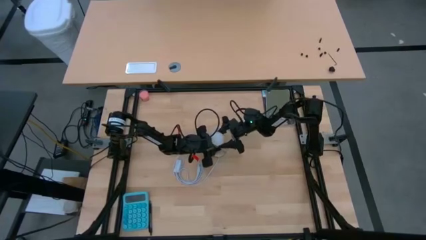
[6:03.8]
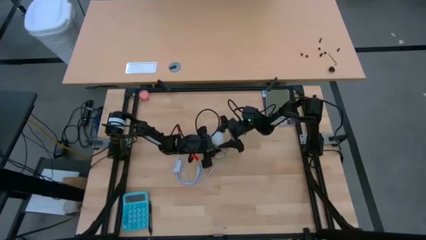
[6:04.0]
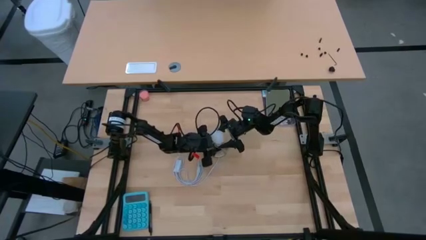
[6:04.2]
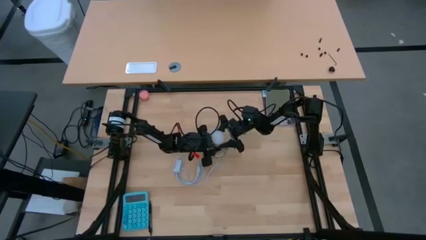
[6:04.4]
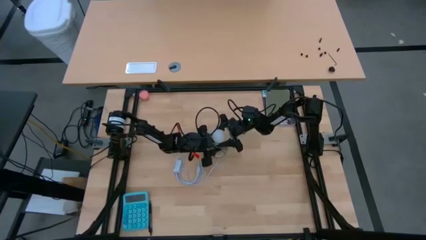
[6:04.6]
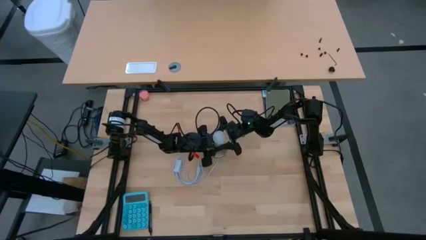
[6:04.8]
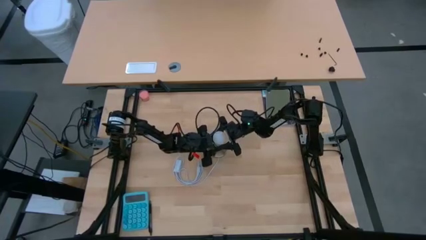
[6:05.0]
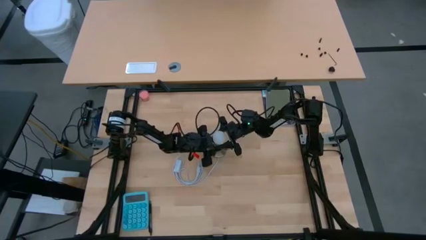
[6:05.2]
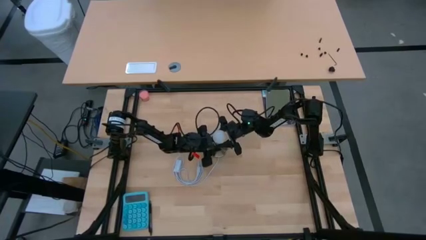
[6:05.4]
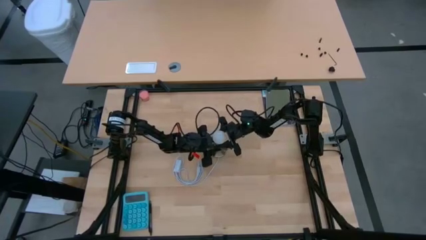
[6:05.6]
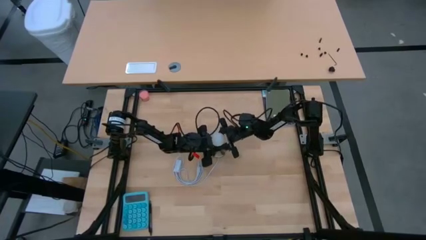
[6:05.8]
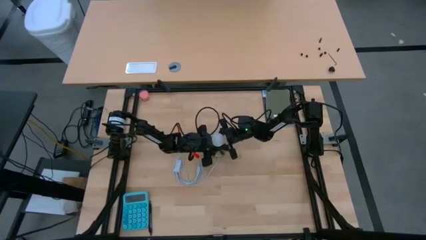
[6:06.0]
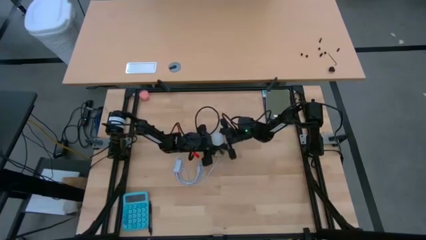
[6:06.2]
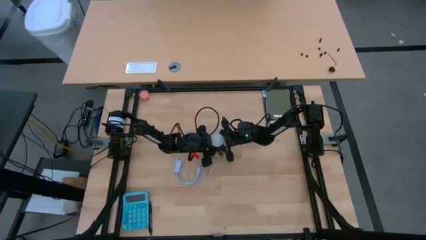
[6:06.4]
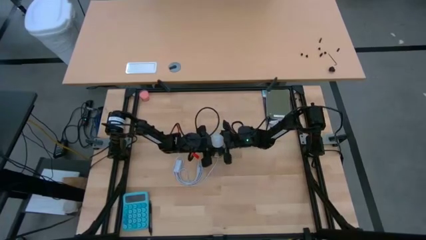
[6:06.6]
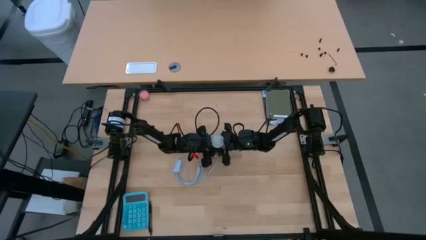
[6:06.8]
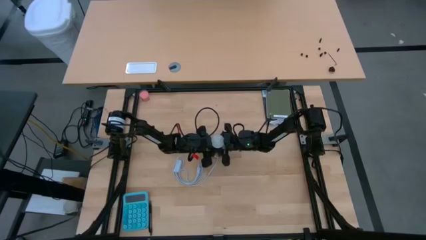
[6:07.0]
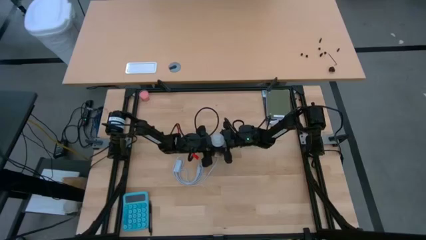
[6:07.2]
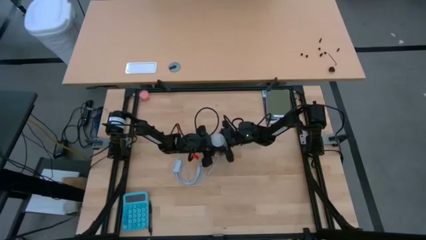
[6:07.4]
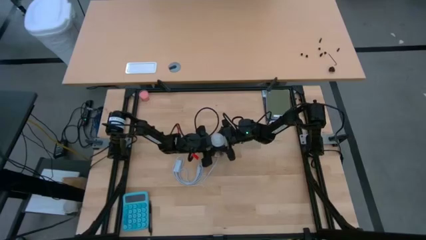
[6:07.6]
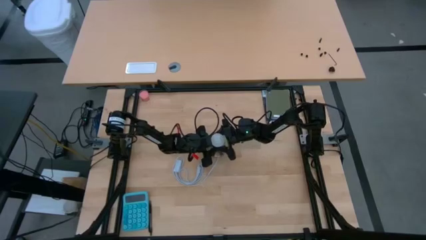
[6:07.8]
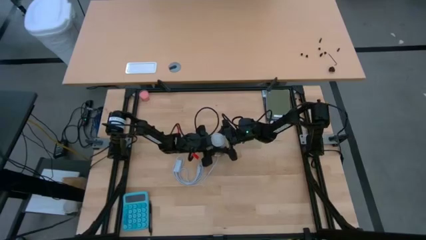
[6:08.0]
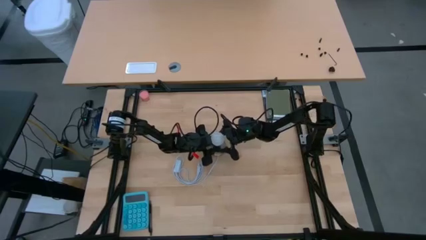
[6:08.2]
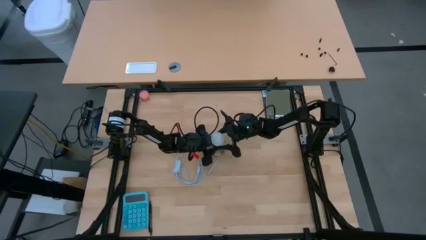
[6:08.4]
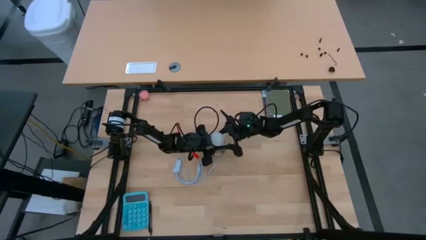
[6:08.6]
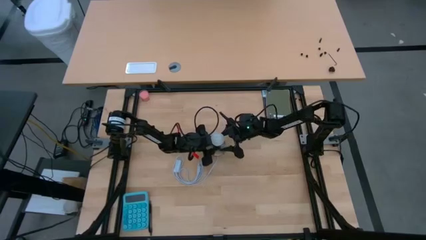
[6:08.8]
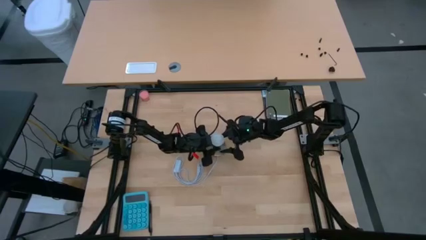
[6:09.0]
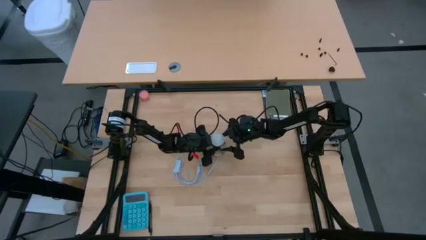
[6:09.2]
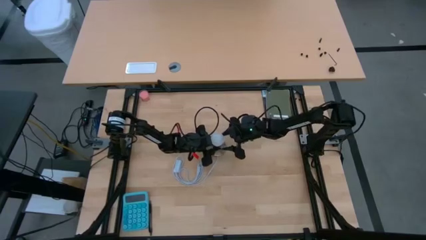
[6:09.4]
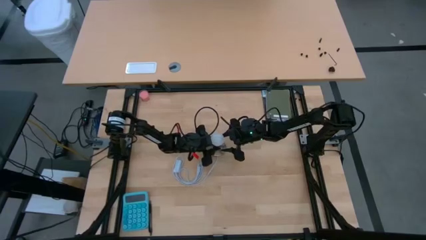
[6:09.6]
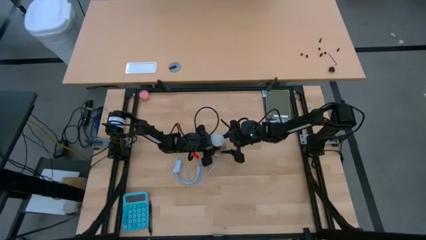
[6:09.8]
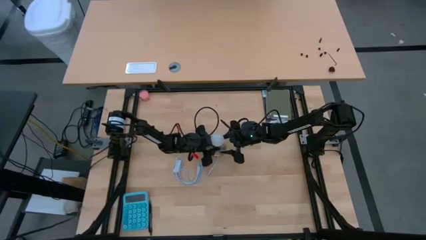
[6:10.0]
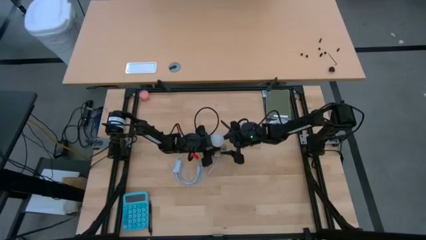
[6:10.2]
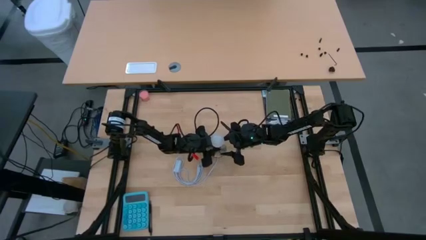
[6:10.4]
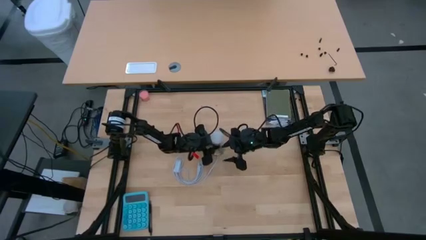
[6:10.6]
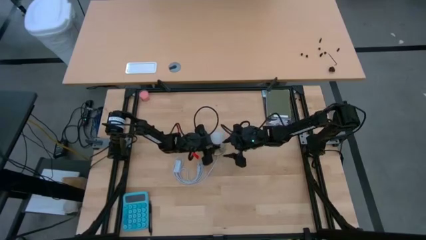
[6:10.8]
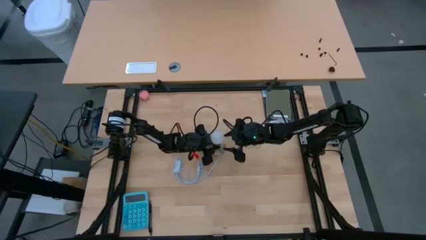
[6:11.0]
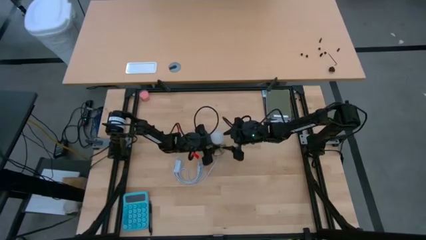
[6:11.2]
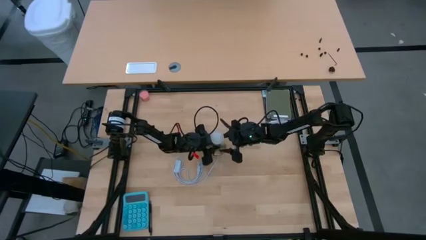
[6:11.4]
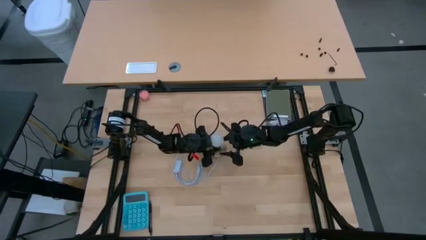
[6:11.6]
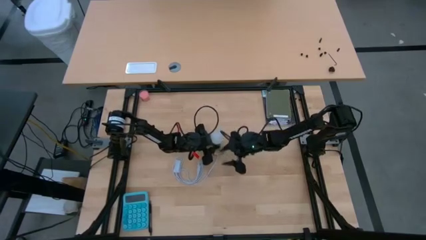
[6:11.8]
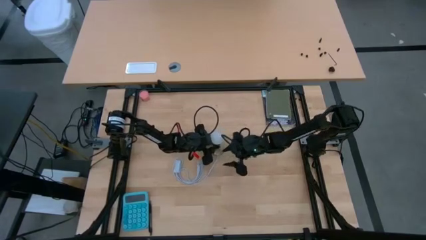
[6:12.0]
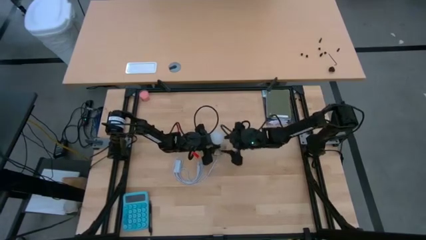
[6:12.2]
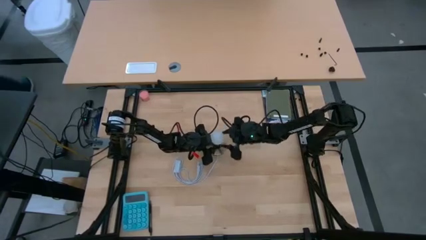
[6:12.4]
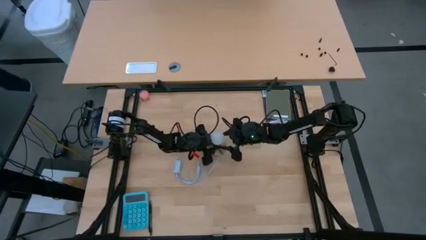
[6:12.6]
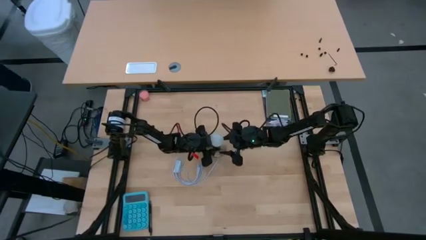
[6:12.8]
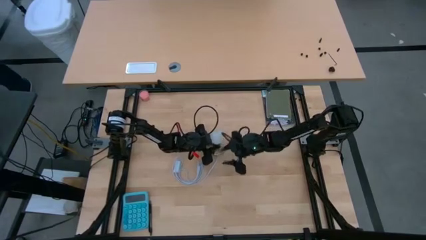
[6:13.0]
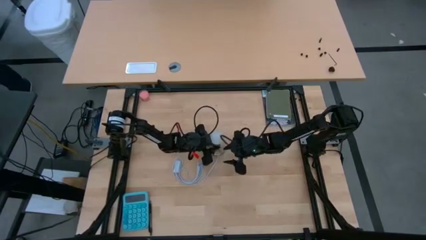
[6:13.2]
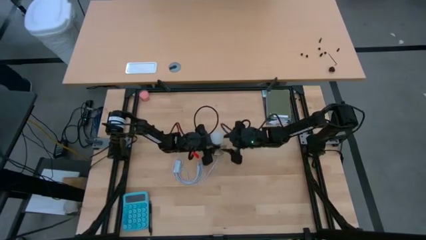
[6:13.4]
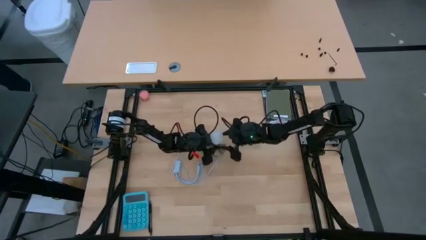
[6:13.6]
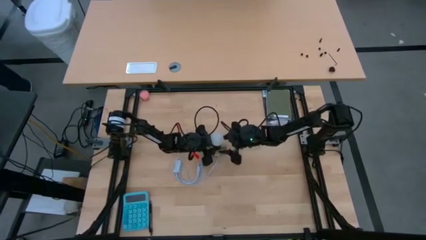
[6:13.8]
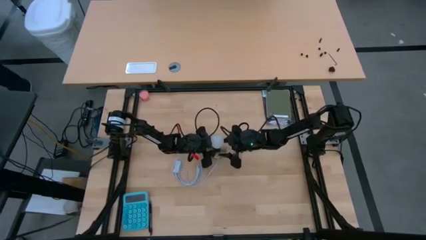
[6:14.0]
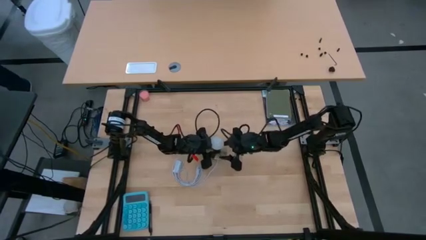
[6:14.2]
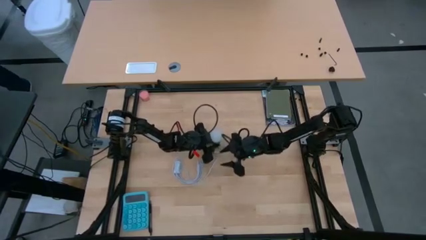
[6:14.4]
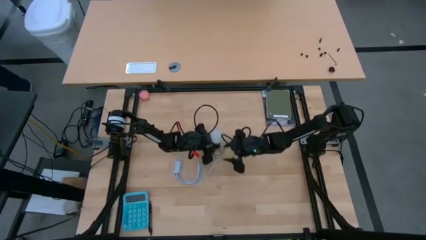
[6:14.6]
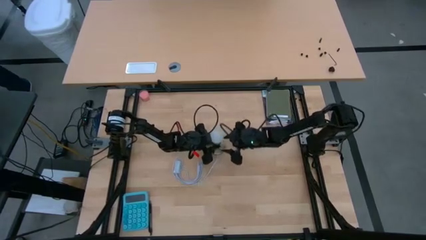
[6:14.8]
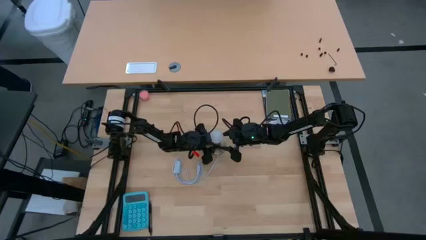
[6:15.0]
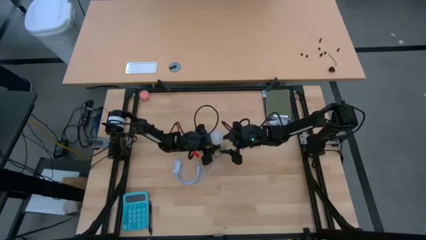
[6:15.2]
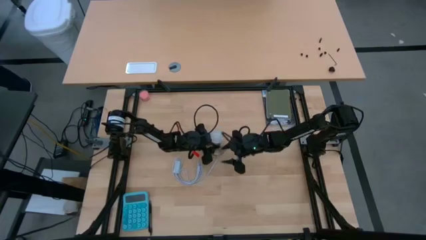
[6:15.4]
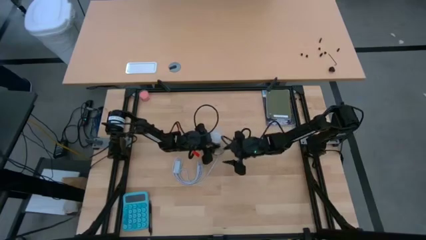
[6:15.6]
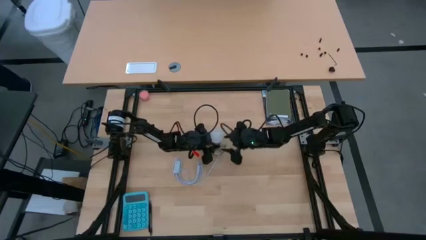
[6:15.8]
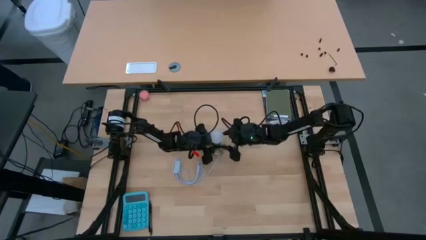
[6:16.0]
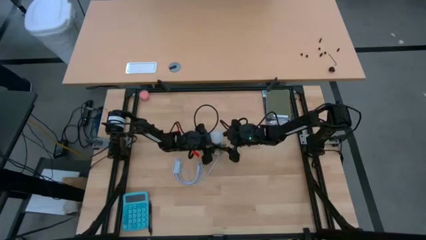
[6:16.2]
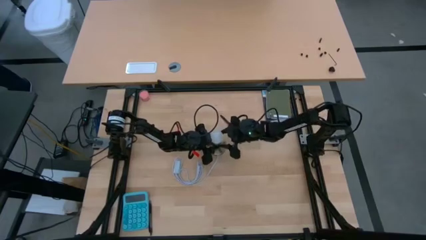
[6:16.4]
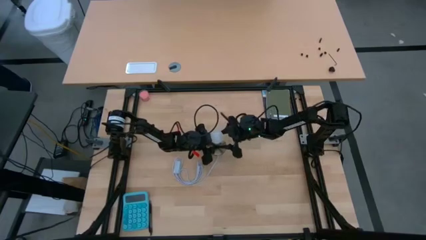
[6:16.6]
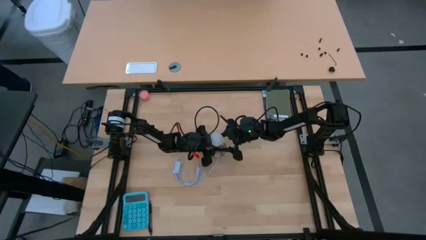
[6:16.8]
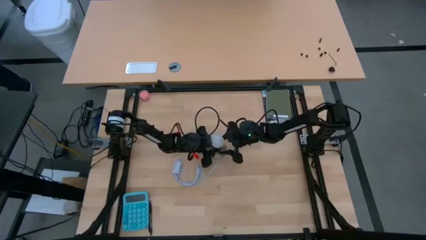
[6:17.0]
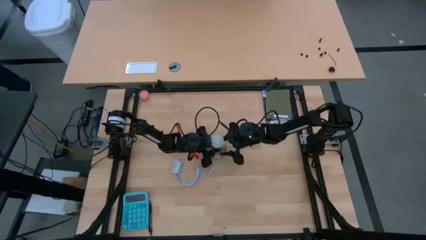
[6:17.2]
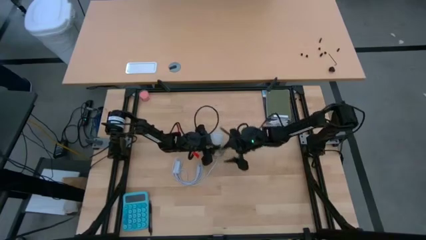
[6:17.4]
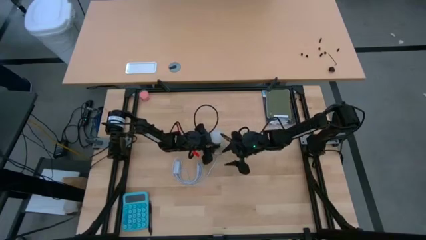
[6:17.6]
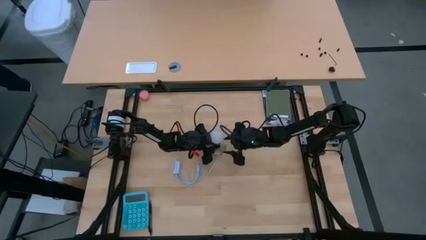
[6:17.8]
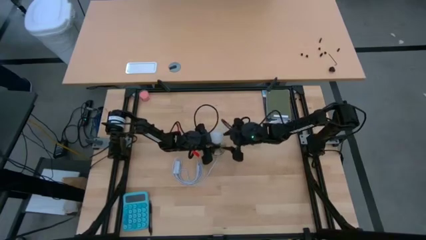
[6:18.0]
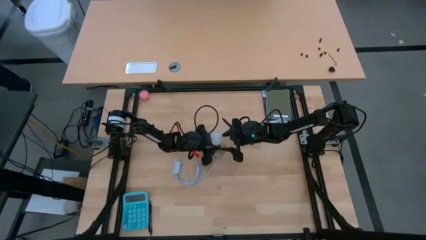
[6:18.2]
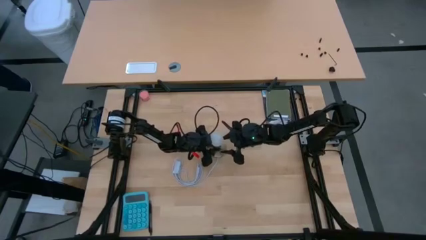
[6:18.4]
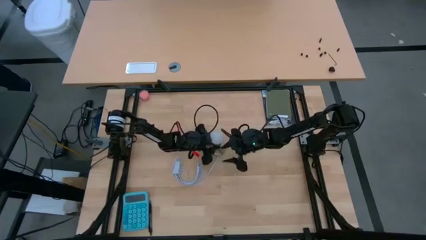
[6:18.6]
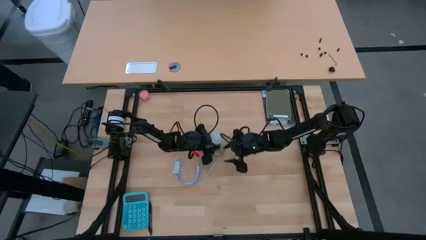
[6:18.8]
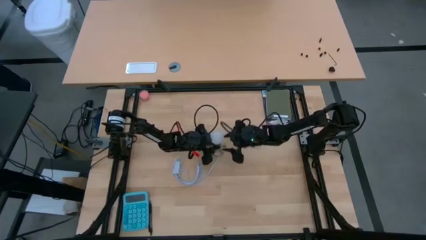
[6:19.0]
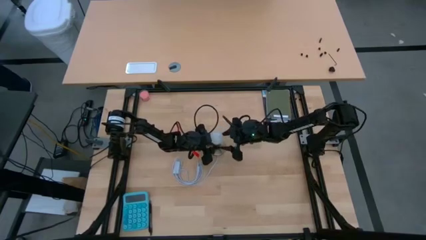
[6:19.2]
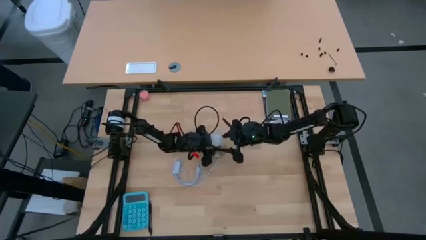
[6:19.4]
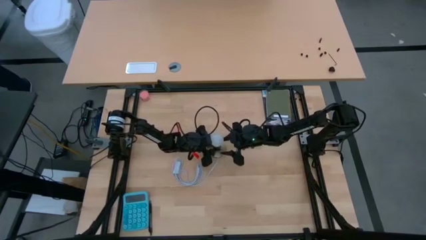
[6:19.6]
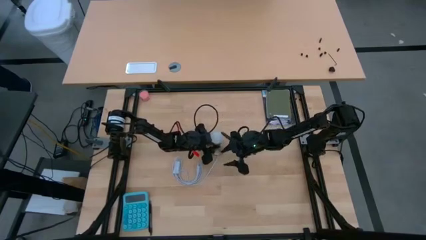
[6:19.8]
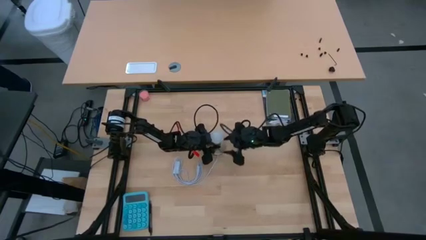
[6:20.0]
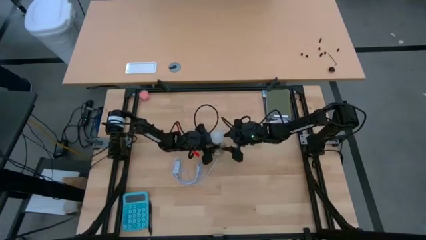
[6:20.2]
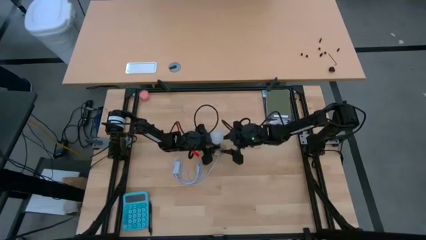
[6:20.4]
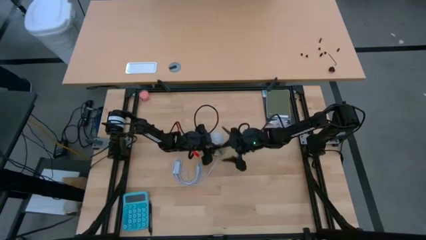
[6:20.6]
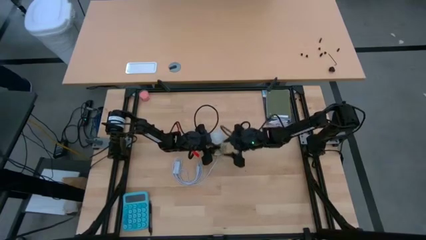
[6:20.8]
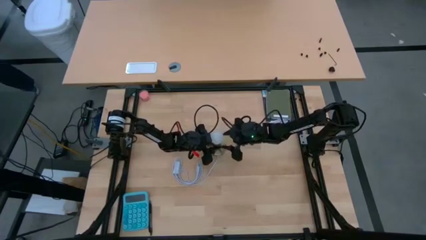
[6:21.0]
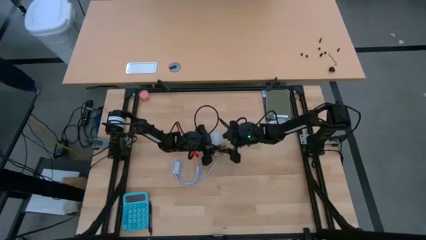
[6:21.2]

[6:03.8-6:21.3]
Task: Screw lightbulb
Insert the lightbulb into the lamp holder
